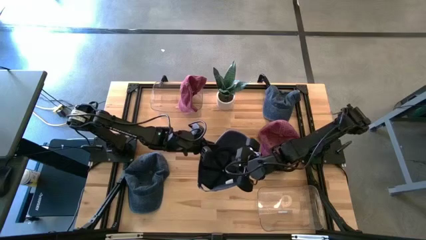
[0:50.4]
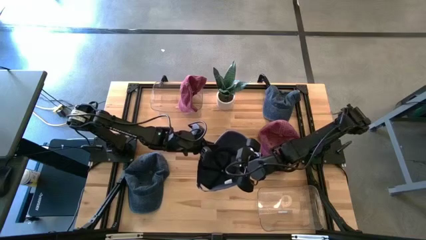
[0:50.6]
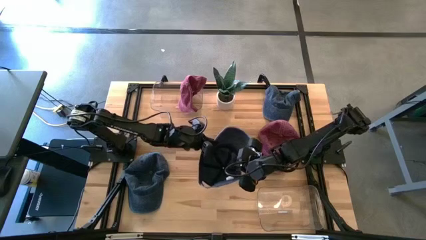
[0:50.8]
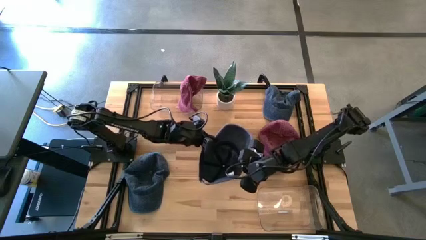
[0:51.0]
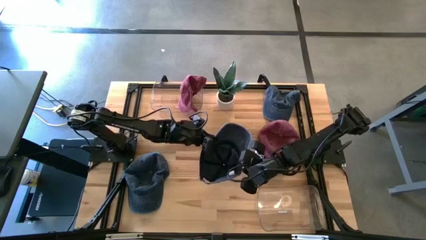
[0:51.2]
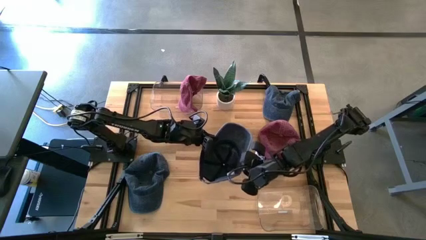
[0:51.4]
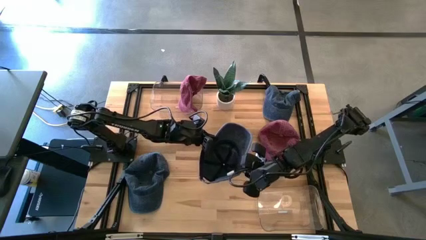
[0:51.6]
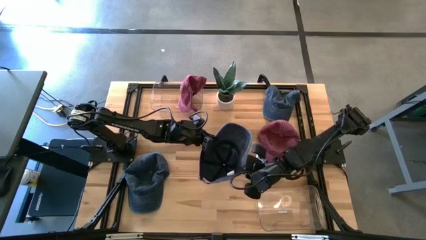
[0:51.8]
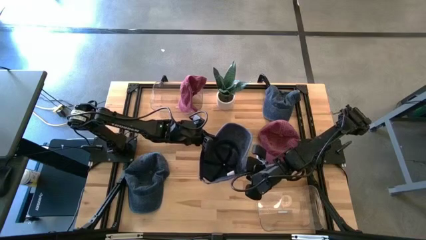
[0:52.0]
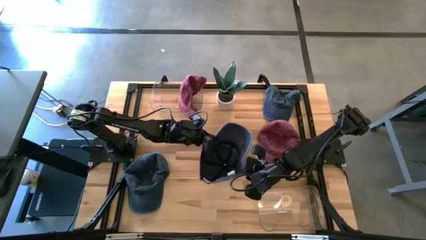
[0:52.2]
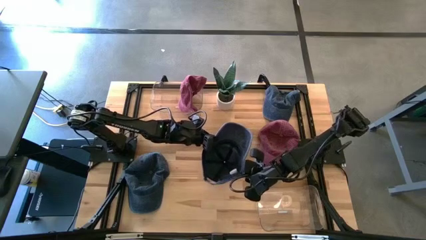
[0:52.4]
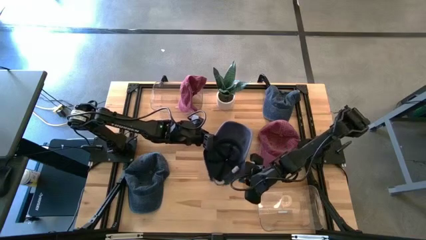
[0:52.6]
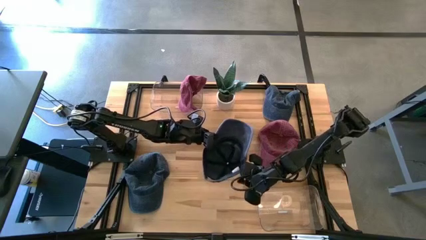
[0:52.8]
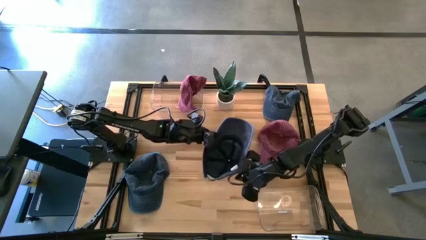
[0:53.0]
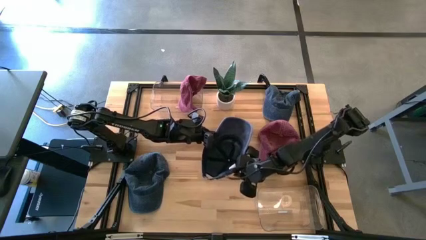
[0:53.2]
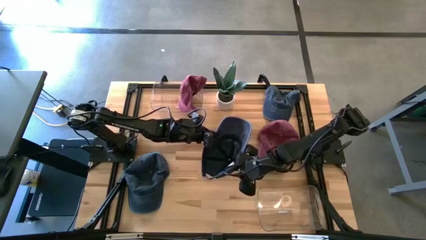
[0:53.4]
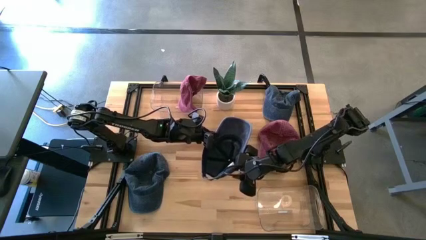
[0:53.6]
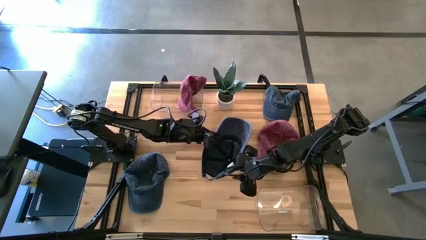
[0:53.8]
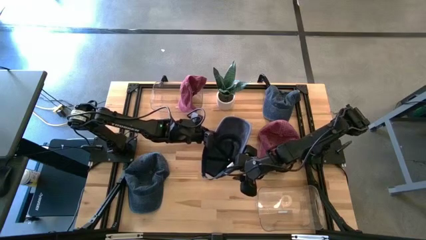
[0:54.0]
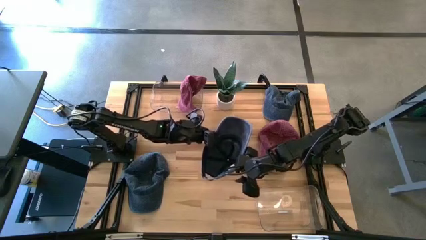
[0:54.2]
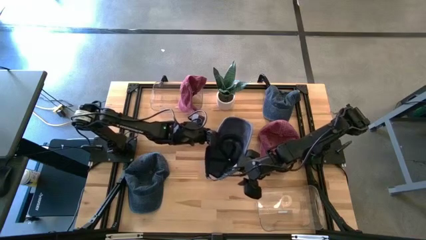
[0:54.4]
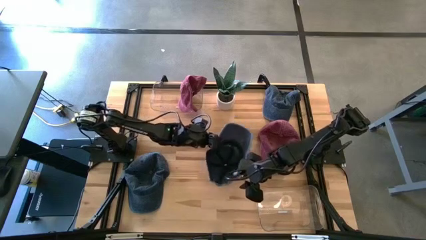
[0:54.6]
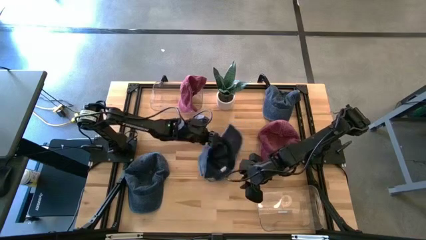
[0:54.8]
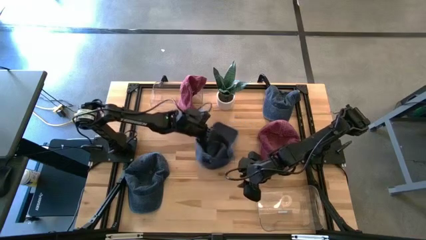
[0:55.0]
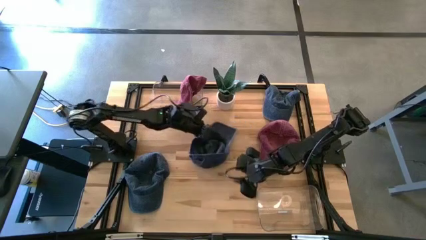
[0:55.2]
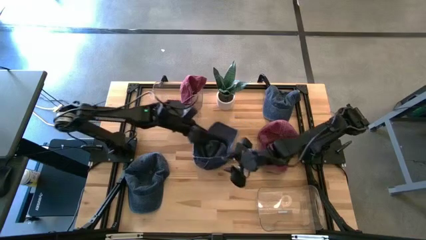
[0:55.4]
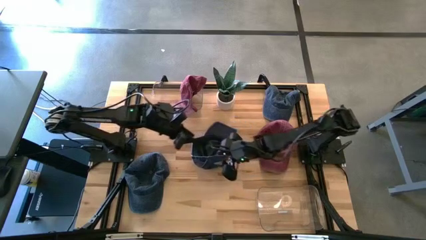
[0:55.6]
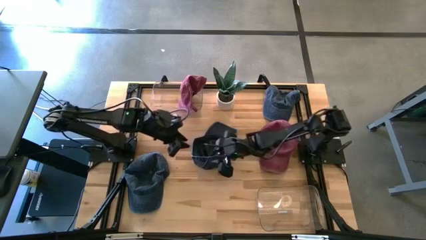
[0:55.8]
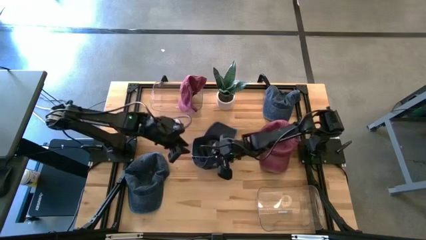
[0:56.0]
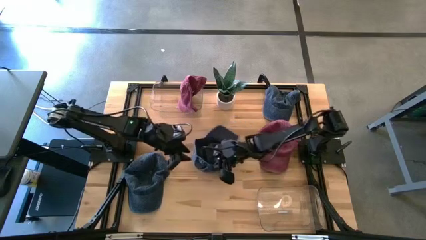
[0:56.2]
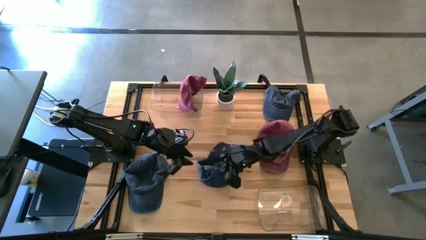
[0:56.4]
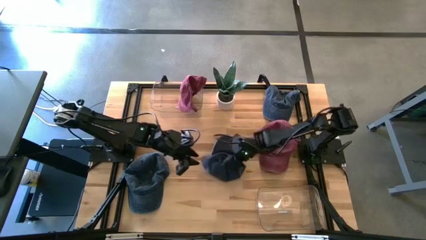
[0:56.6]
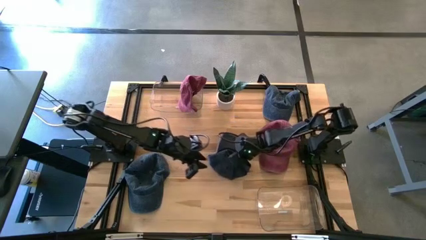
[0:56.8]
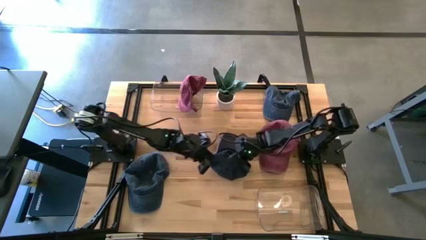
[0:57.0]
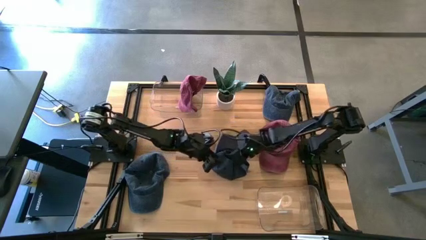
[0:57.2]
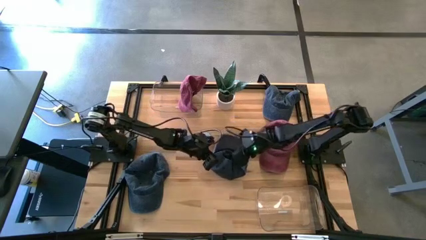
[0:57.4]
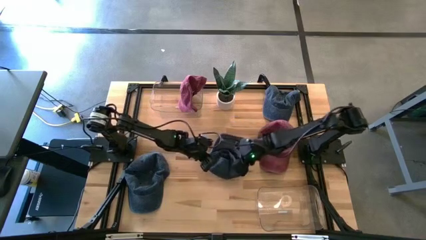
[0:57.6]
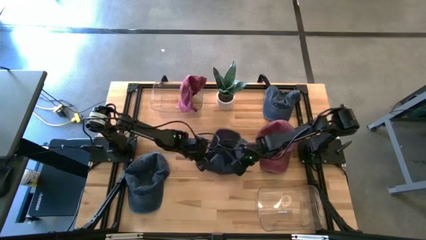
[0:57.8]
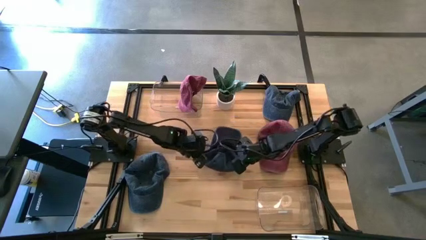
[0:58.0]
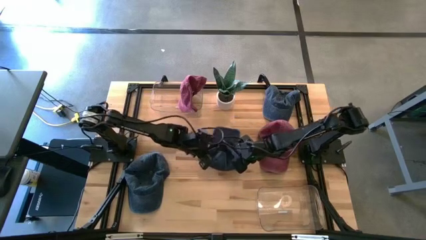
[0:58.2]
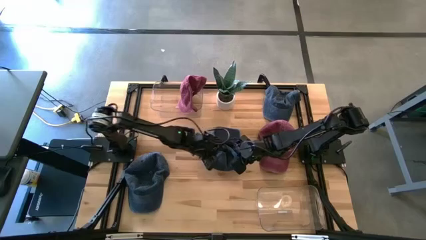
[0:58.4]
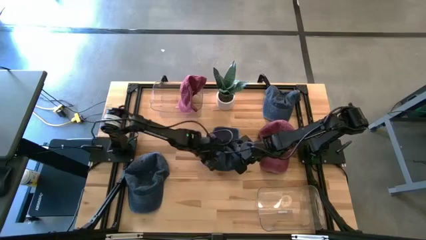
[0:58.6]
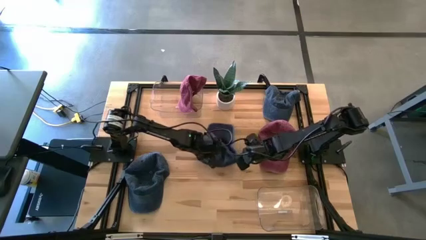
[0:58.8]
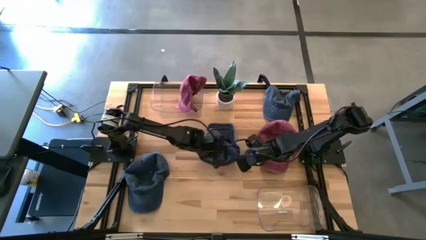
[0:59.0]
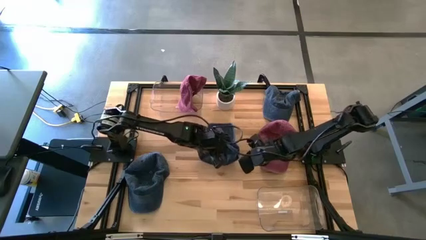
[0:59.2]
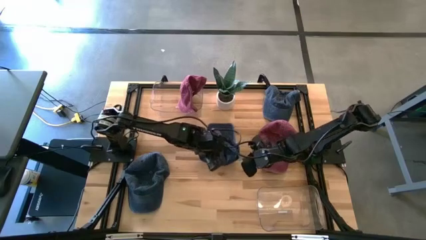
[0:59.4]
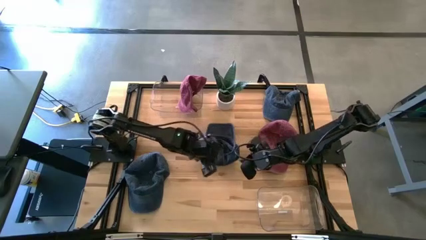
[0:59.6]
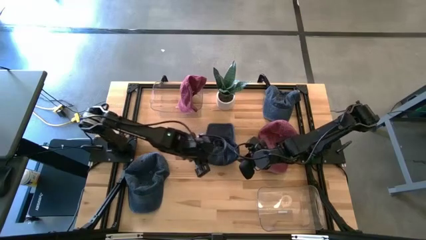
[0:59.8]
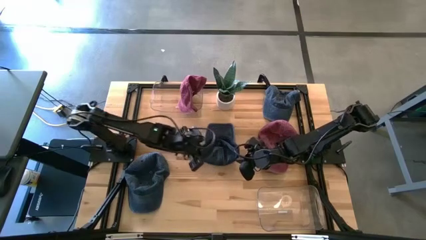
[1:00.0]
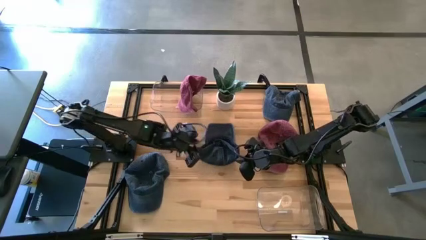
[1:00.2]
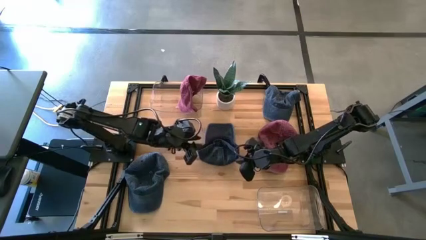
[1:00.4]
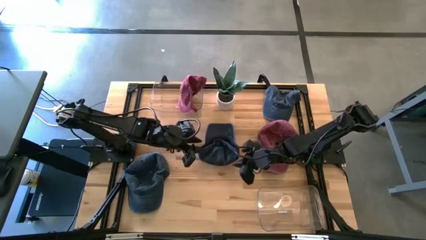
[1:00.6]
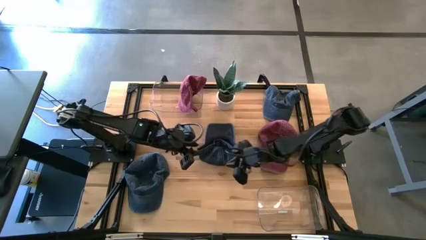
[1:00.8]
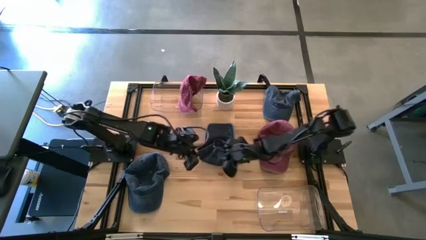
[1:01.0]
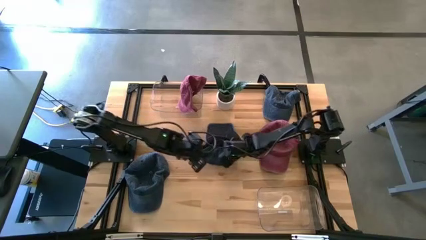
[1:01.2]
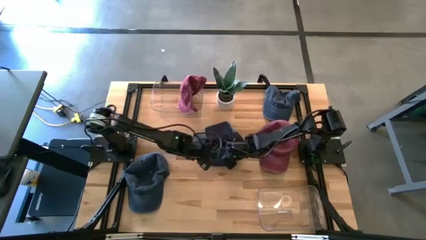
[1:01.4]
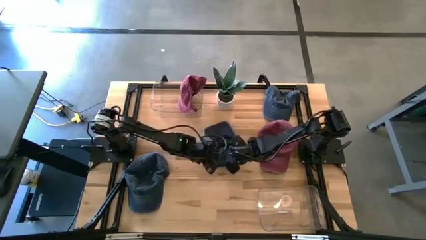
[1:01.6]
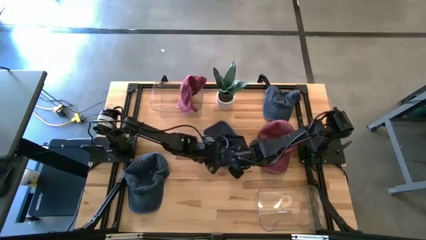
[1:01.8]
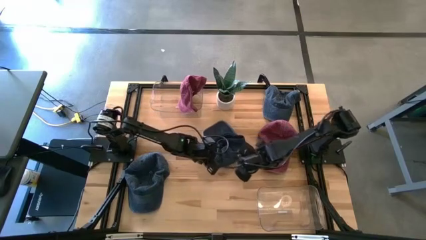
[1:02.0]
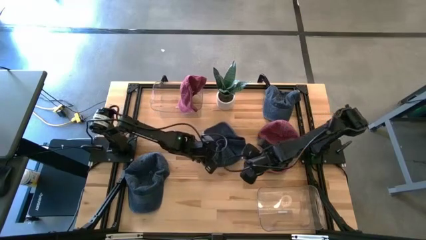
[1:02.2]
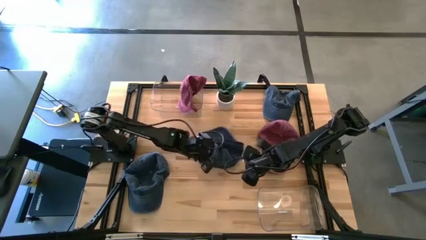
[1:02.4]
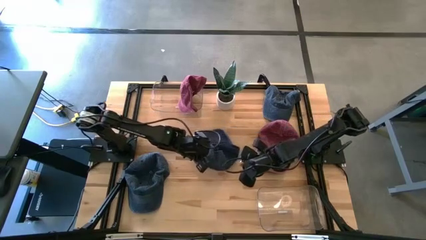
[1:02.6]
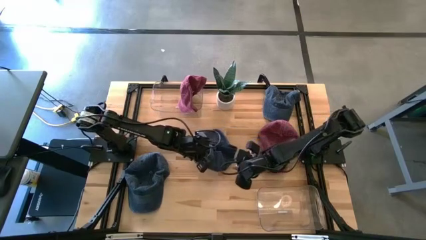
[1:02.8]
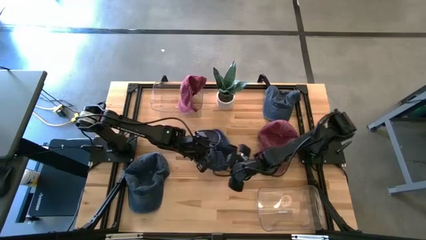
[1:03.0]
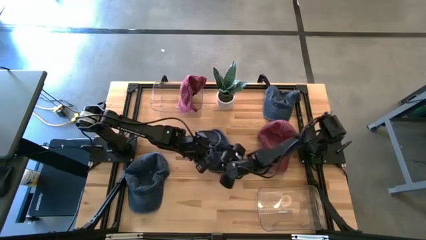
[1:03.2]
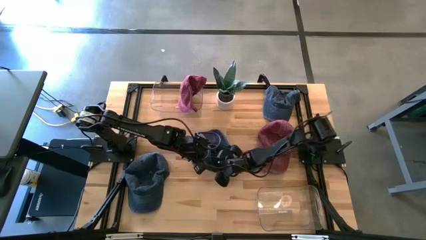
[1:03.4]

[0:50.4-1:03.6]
Task: Pick & Place hat
Put the middle blue cap into the bottom transparent bin

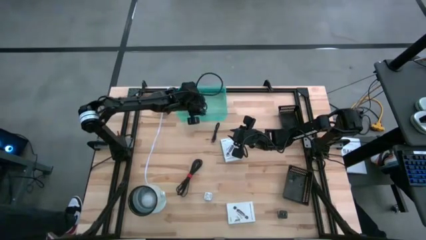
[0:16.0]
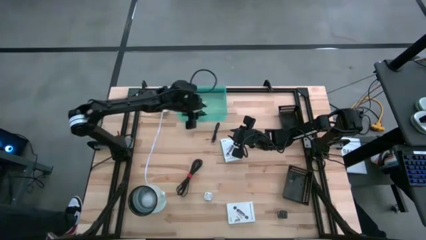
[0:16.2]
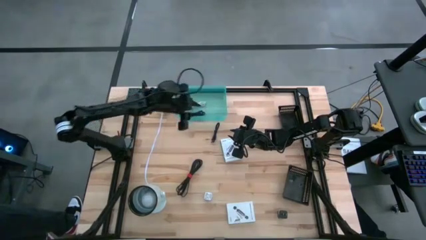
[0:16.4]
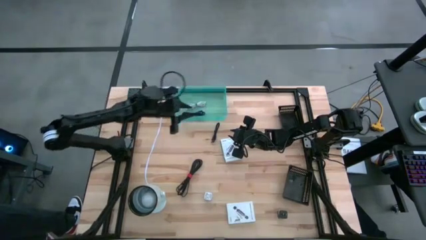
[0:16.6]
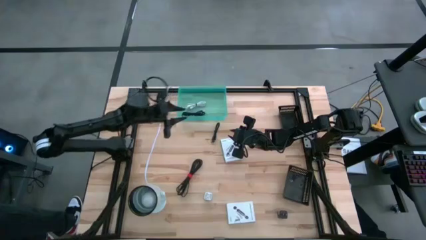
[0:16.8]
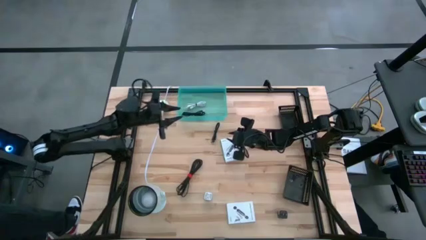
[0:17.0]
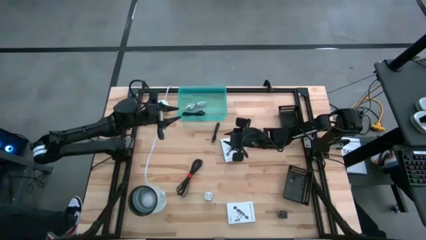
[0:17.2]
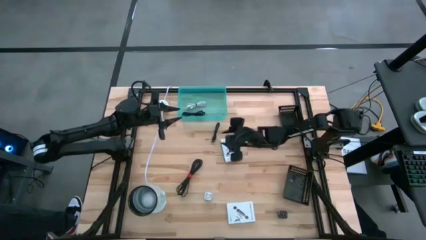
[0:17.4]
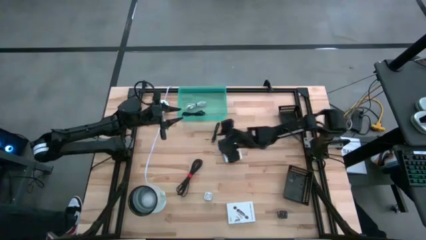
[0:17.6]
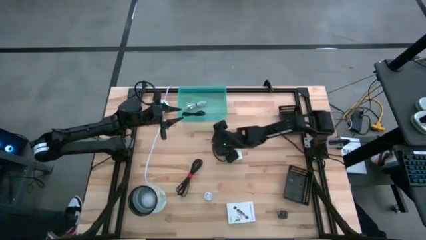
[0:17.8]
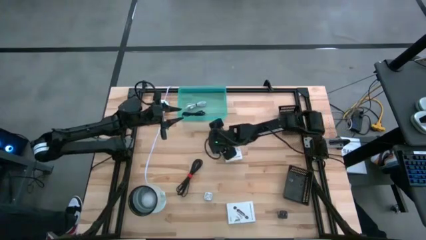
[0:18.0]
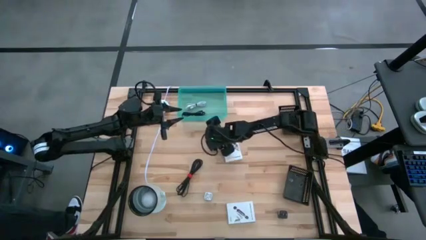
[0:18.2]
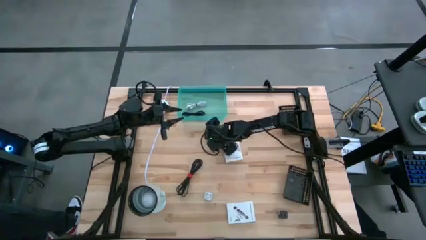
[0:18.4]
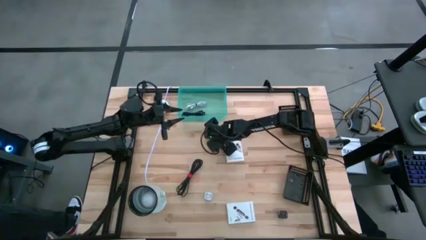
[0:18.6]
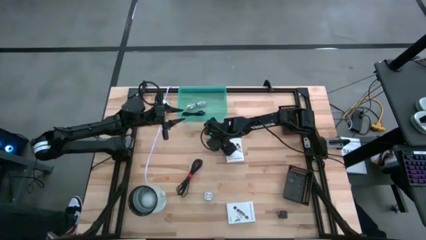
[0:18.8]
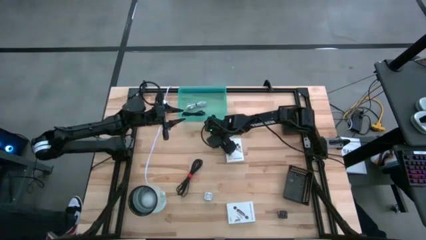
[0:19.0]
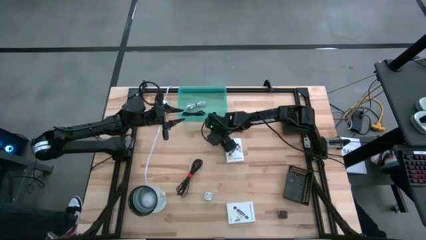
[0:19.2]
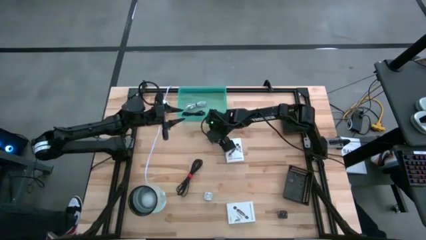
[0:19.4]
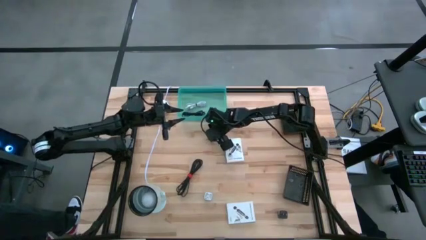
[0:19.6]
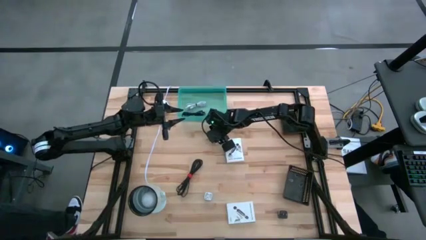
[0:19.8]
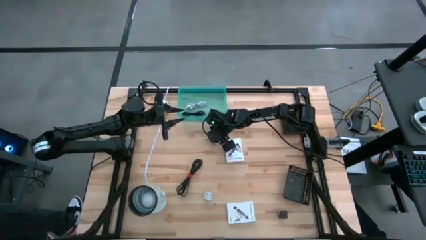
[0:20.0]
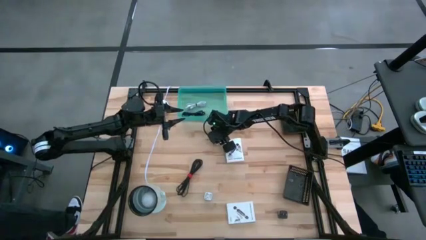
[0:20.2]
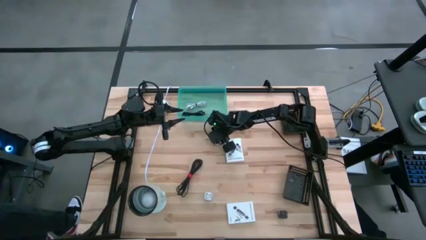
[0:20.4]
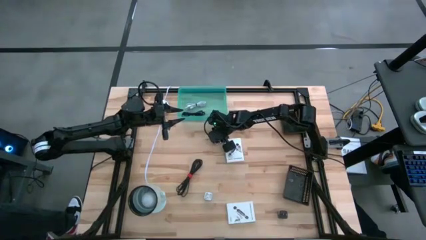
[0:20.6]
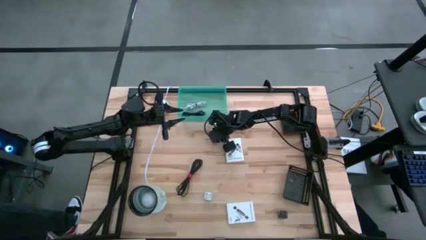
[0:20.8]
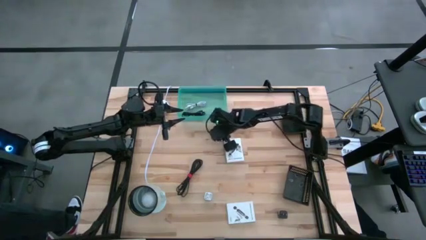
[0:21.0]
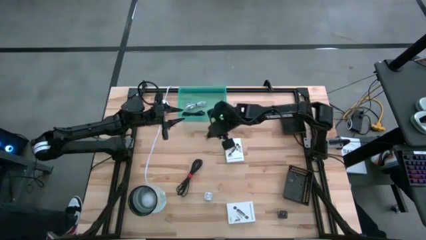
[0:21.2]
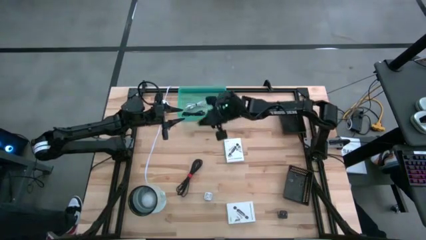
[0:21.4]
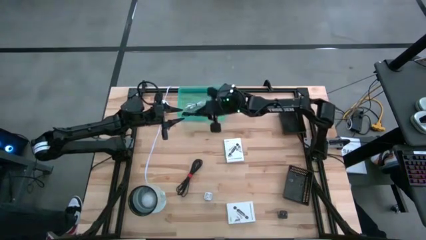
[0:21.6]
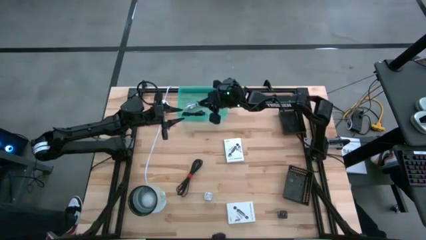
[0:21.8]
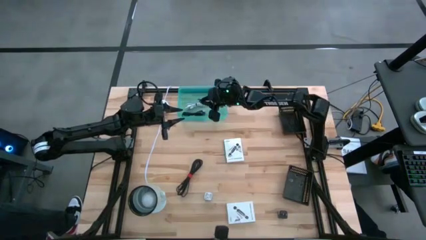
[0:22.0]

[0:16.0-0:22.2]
Task: Pick and place items into bin
Put the top black charger cable into the blue bin
